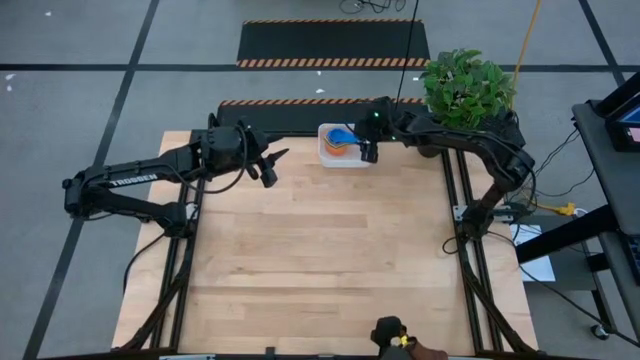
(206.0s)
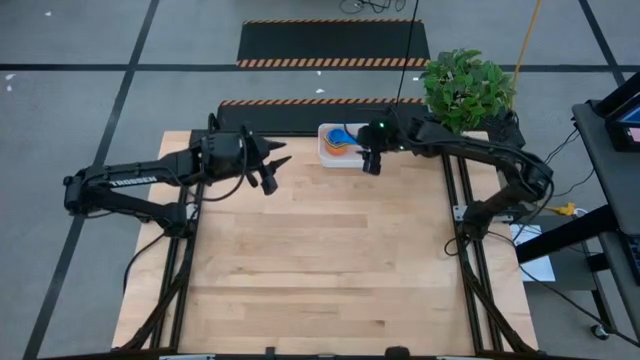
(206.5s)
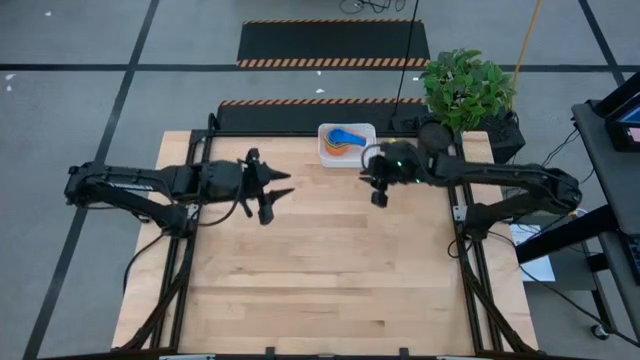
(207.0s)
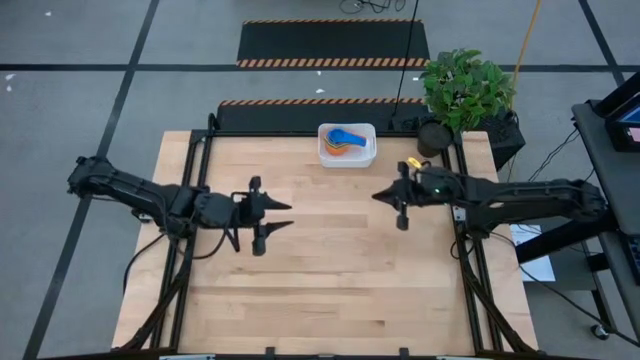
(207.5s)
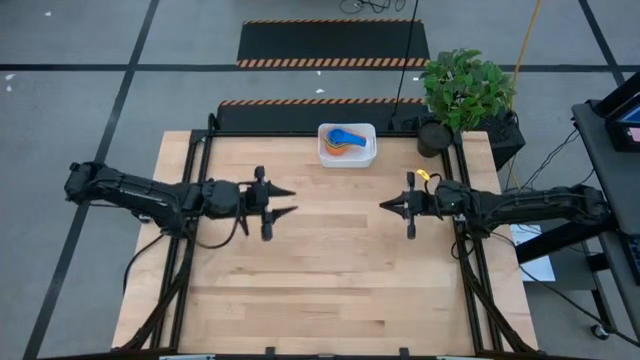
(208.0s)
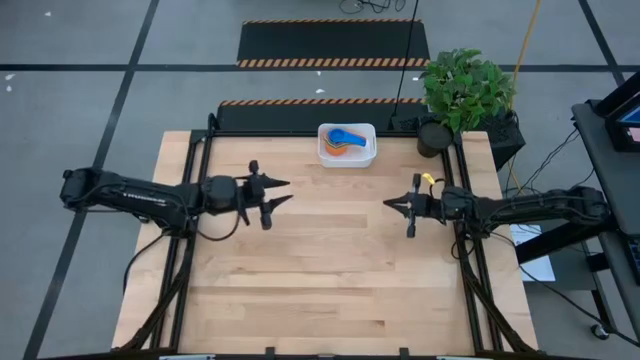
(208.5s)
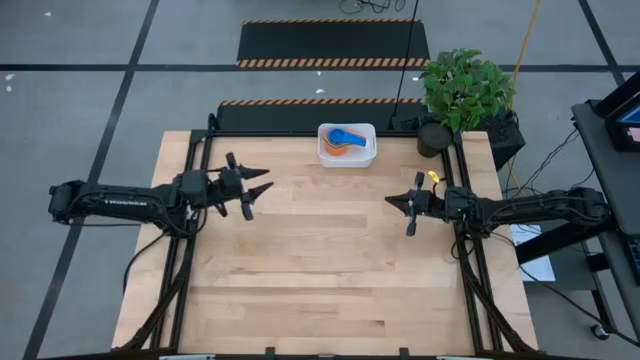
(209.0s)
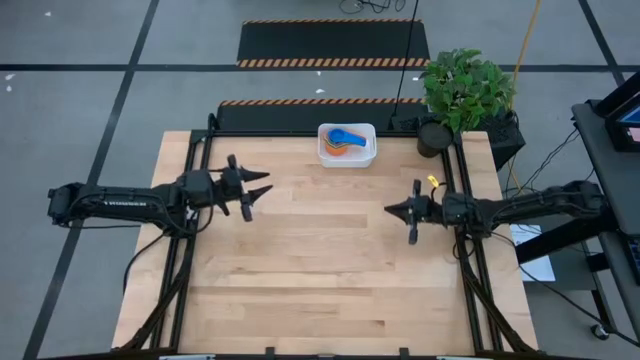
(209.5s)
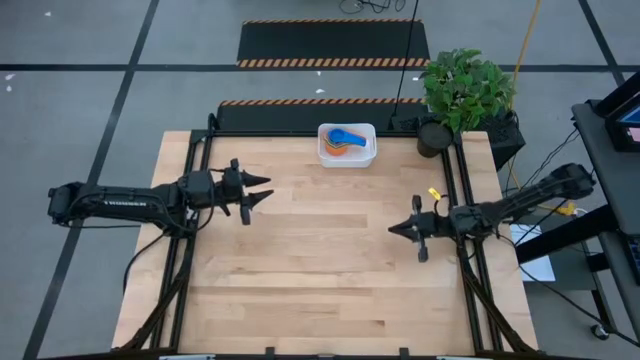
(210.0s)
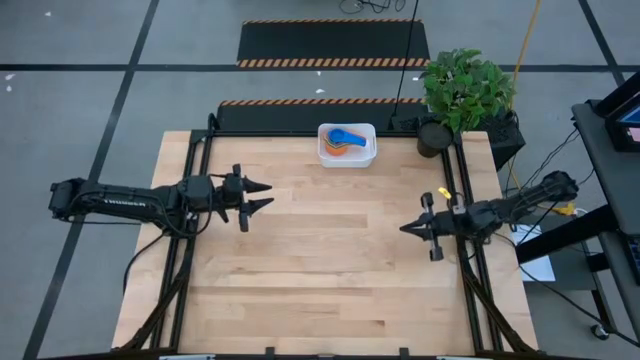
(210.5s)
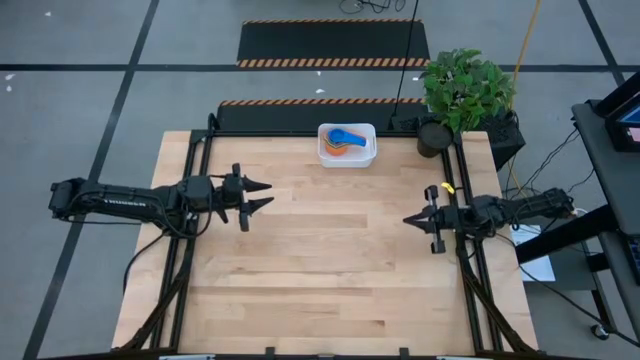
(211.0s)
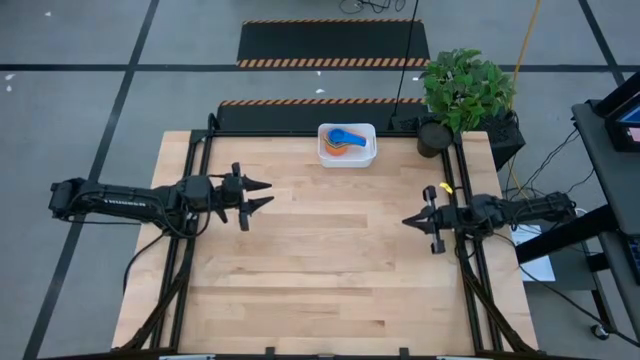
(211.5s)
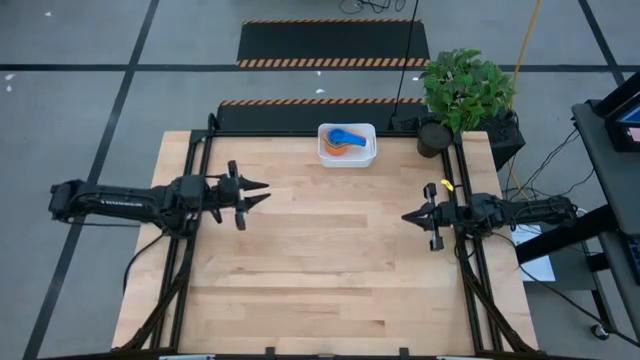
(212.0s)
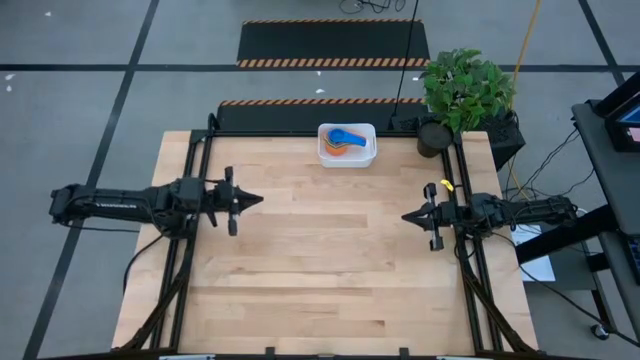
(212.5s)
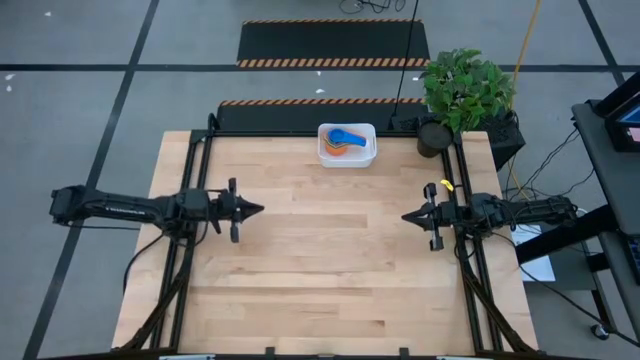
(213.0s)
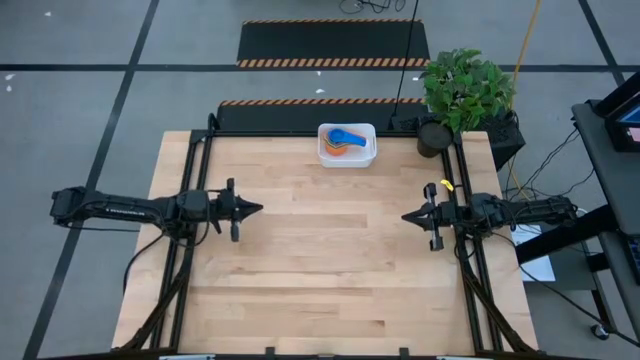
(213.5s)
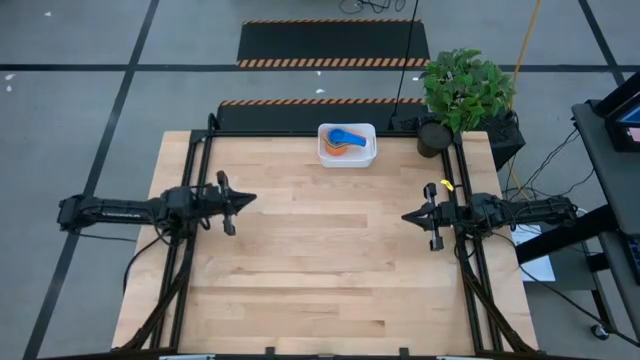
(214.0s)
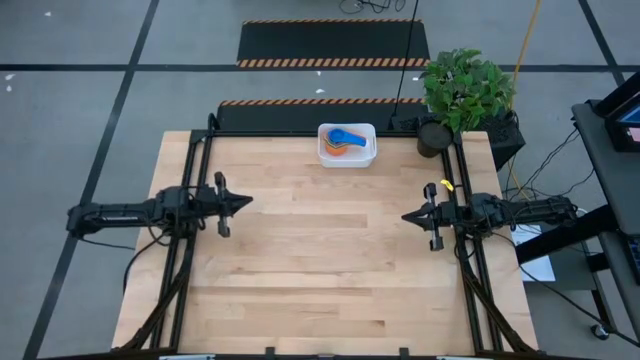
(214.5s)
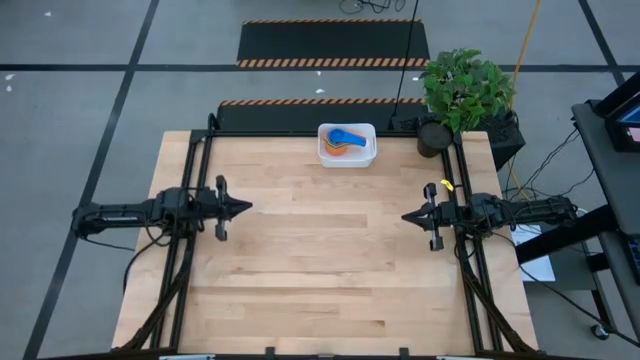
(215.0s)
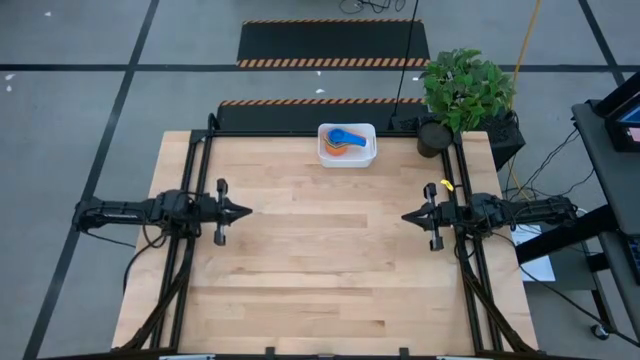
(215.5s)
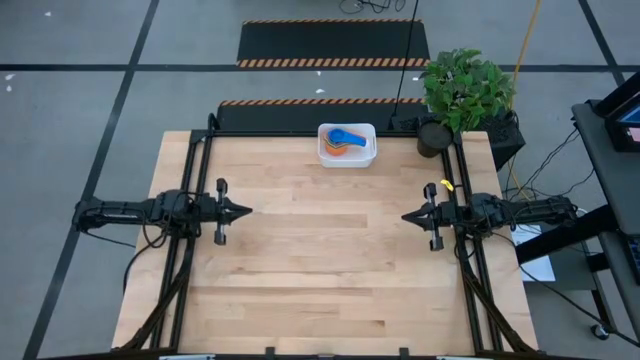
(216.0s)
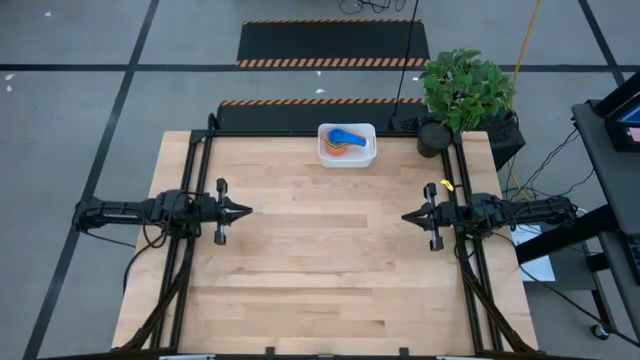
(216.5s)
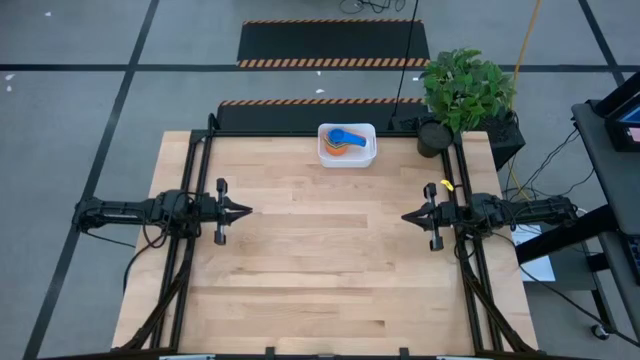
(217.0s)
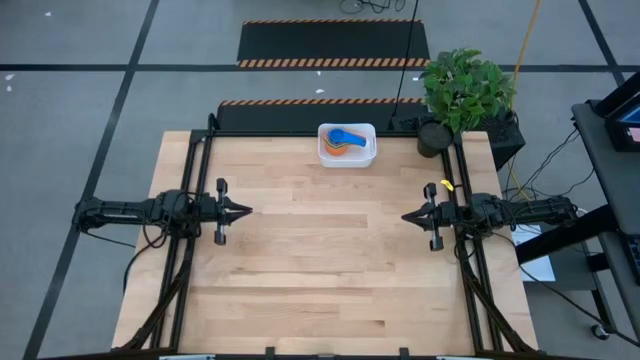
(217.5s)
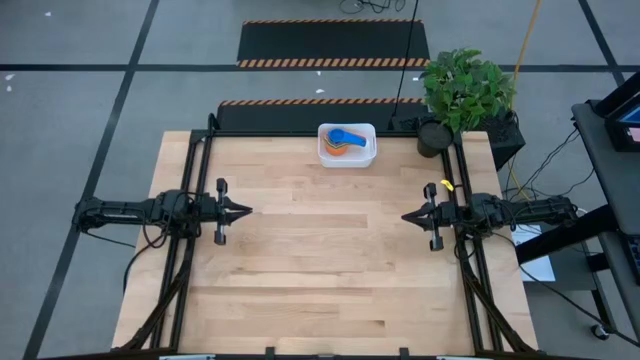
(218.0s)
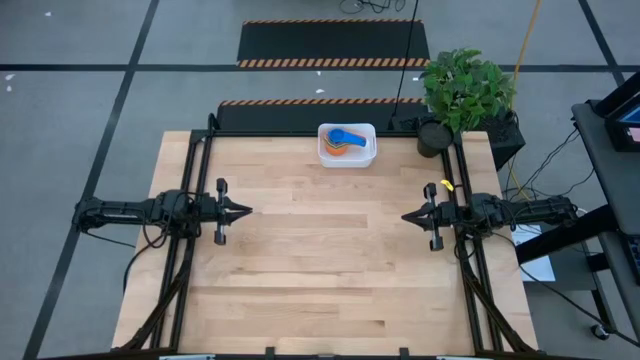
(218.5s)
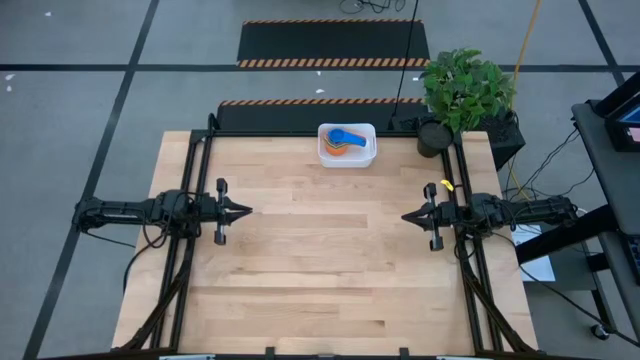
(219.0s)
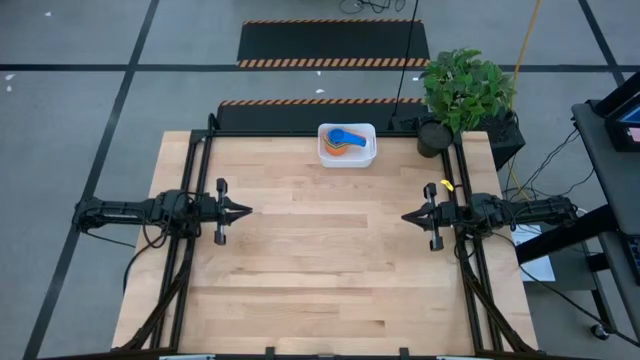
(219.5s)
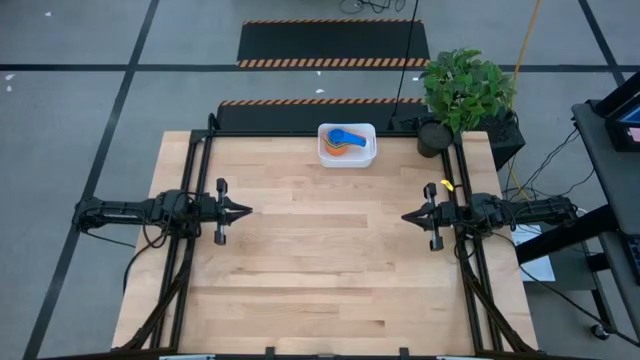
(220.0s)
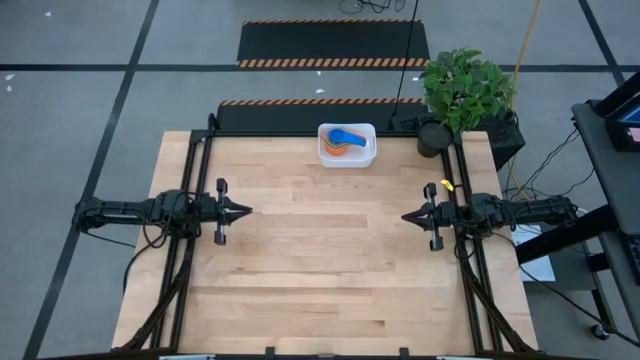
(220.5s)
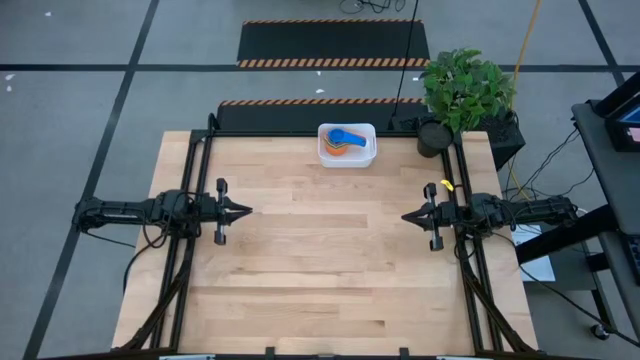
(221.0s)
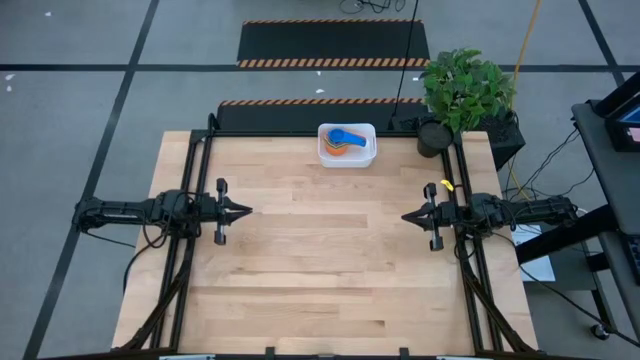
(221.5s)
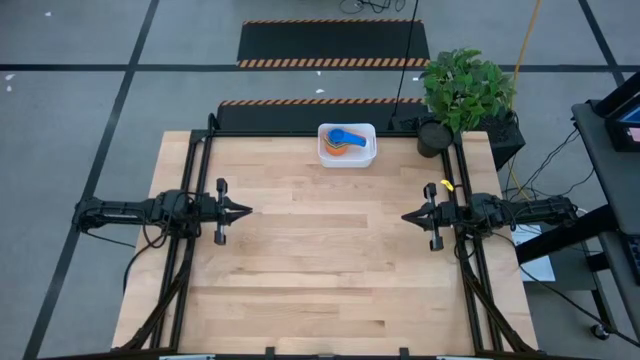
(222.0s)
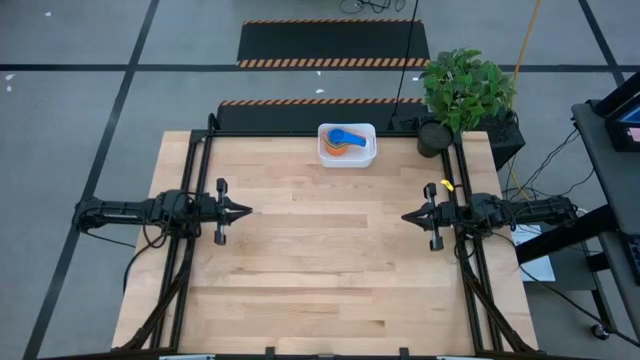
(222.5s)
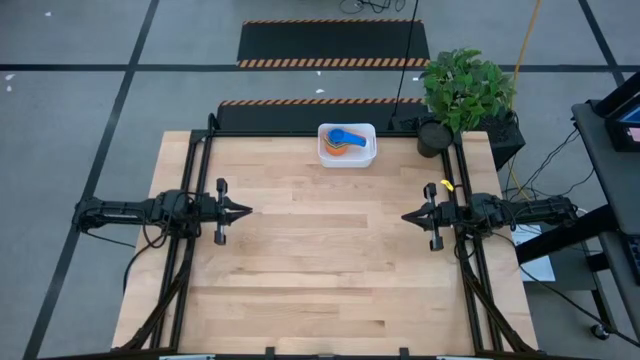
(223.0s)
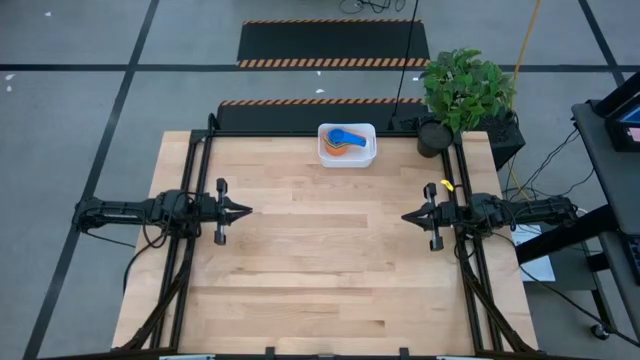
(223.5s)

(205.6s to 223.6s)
Task: Nest measuring cups in basket
Return to Home Position

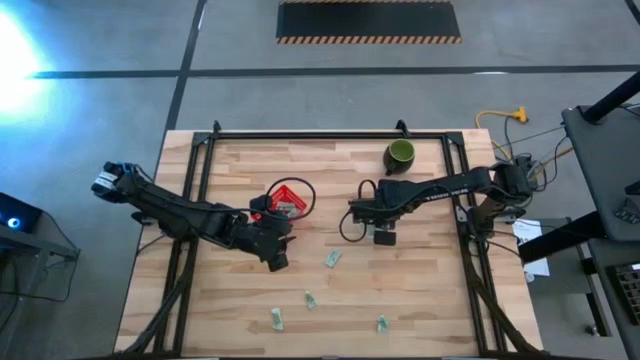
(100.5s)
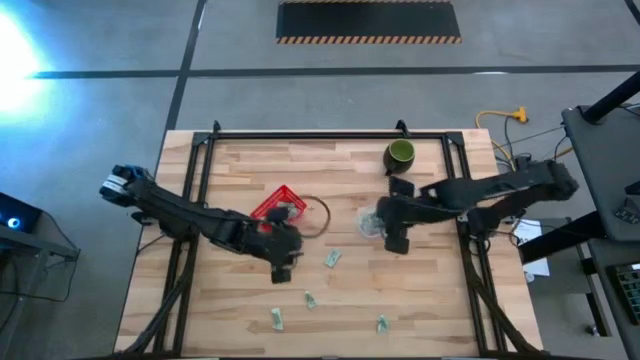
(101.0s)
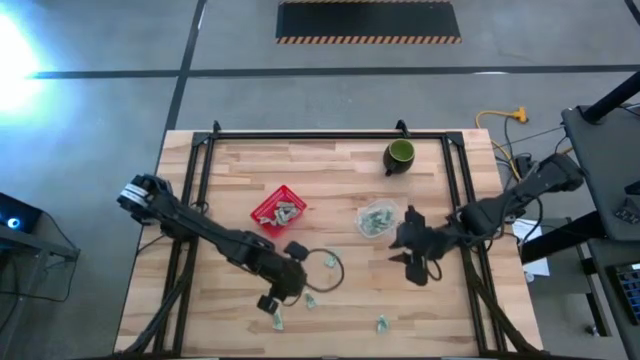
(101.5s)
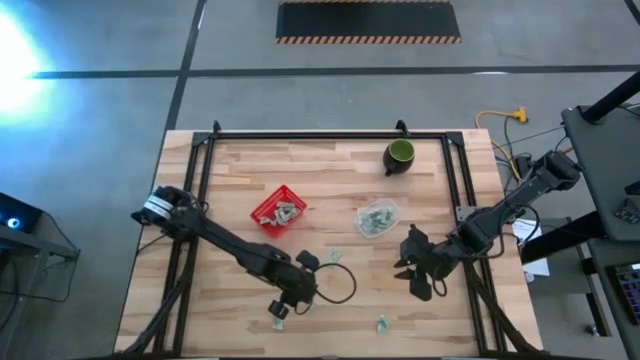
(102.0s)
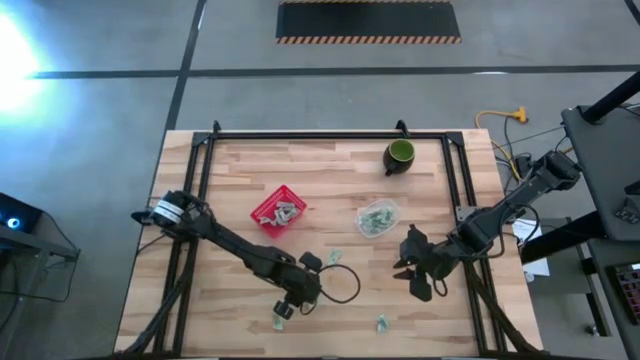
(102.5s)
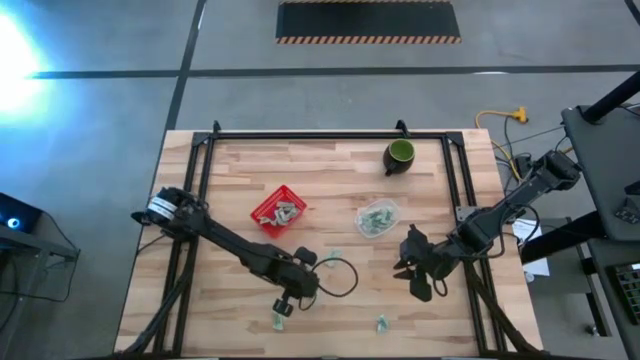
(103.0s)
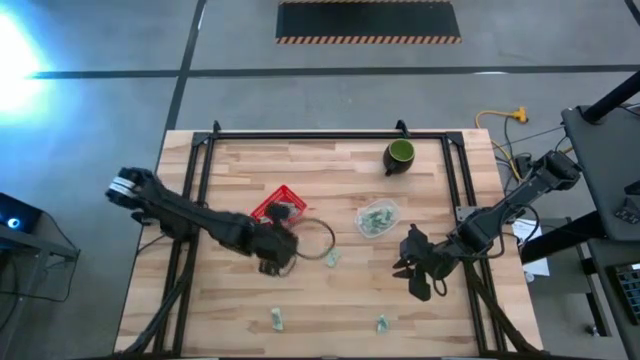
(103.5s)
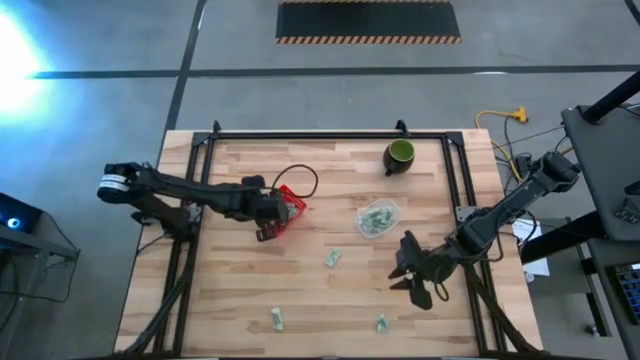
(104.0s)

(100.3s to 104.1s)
Task: Pick and place items into bin
Put the stevia packet into the red bin
